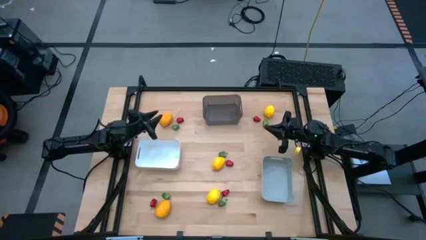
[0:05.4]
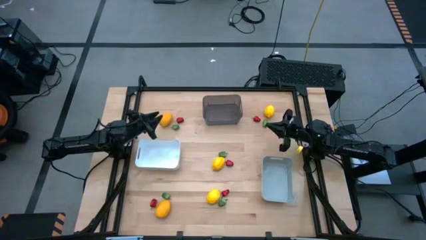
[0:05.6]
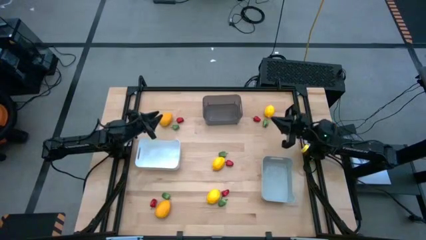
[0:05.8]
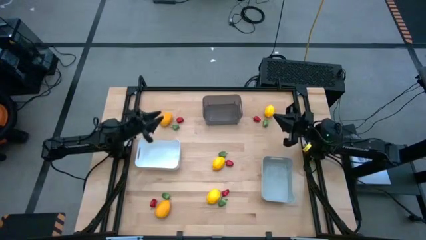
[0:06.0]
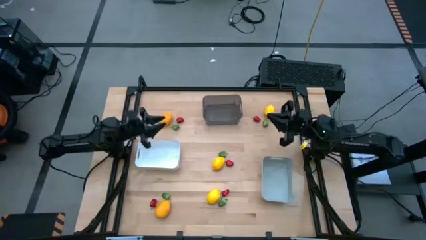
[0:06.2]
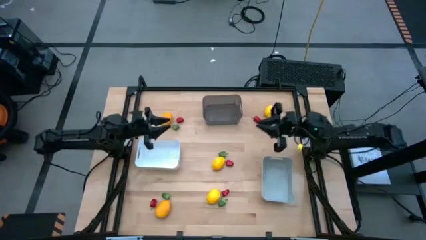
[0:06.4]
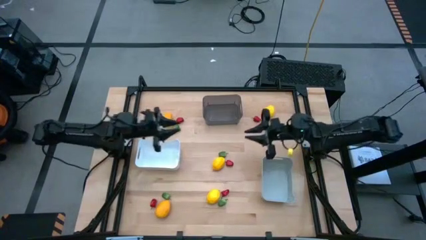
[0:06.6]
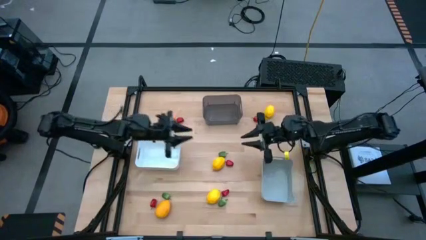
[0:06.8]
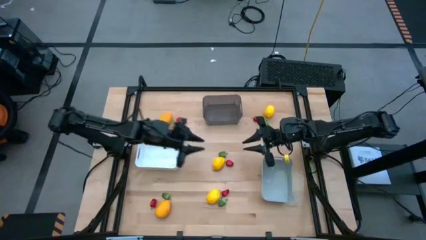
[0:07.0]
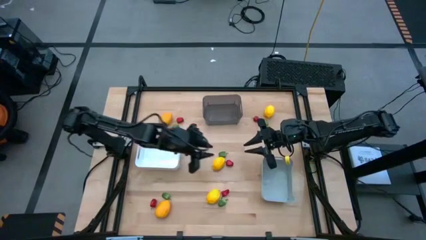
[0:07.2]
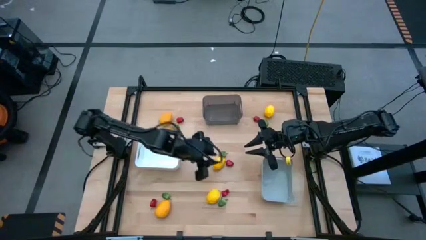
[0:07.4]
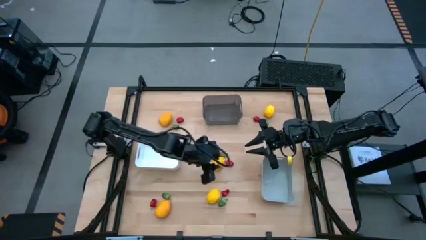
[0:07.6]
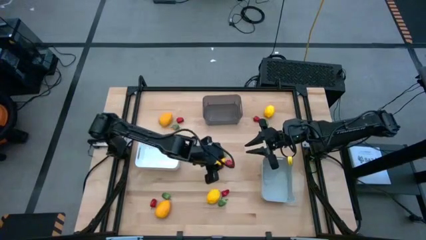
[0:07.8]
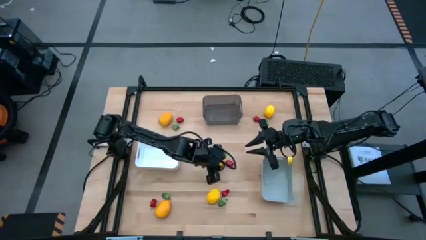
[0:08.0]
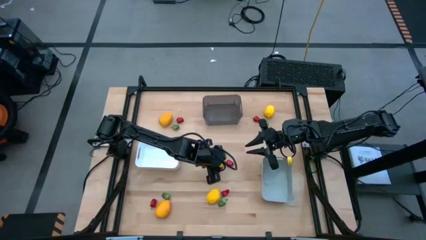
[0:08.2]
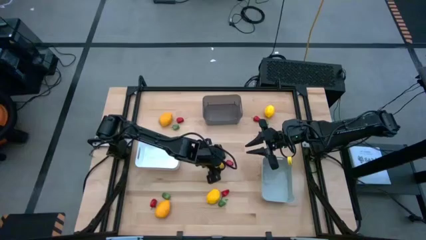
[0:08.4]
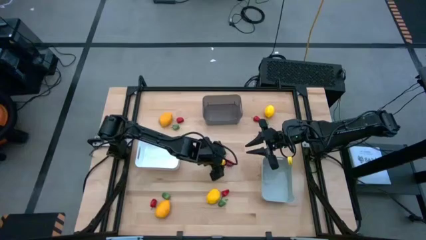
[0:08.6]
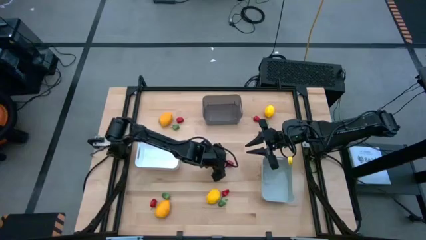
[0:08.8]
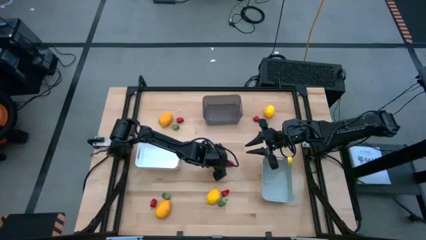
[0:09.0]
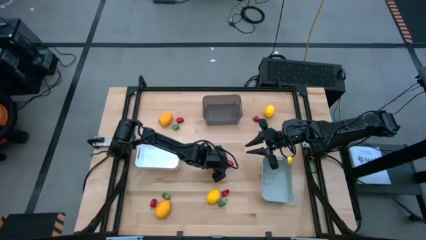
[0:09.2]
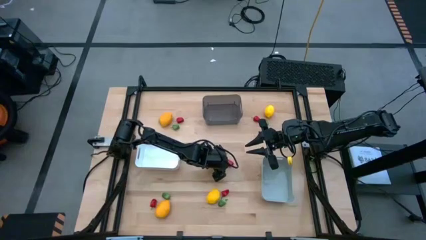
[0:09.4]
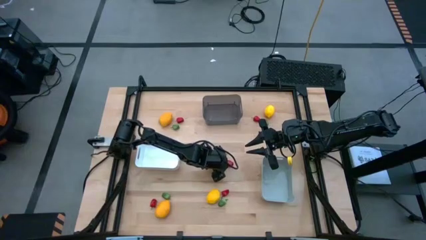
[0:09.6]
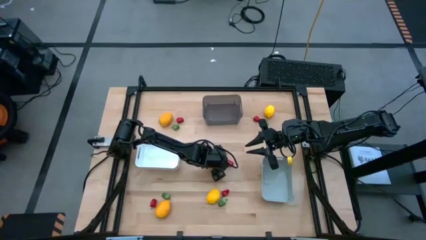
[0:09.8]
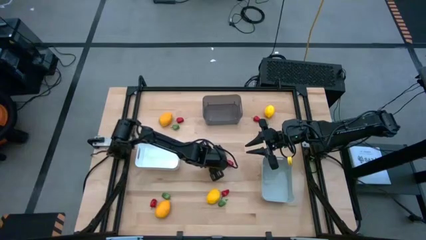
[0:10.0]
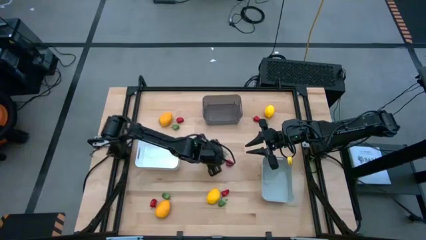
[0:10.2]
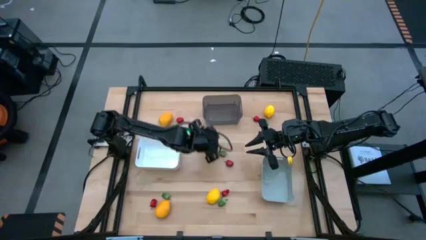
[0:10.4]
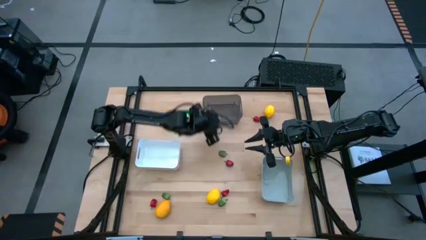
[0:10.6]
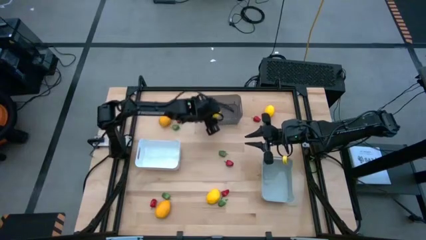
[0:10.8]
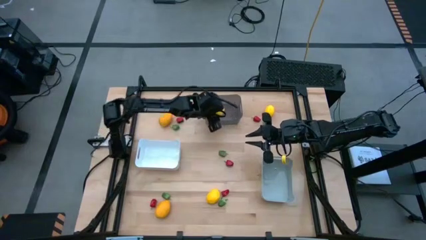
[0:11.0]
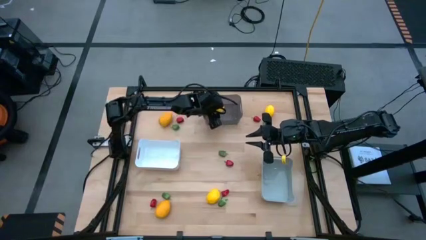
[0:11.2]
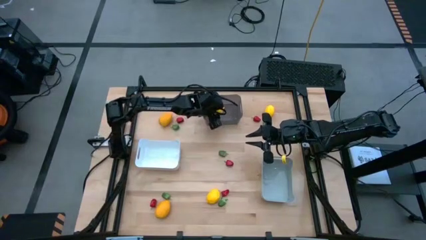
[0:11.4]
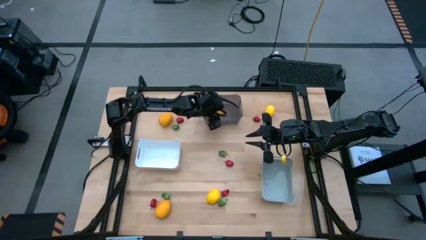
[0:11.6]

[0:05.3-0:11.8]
Task: Sort produce into baskets
Put the yellow lemon into the black bin

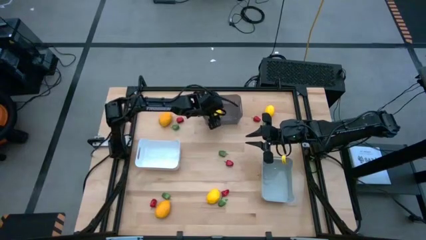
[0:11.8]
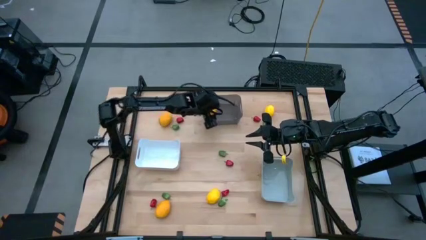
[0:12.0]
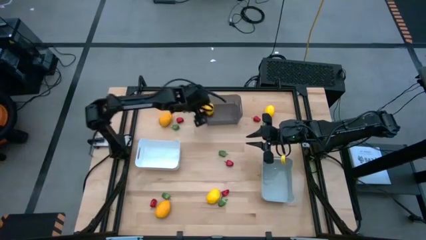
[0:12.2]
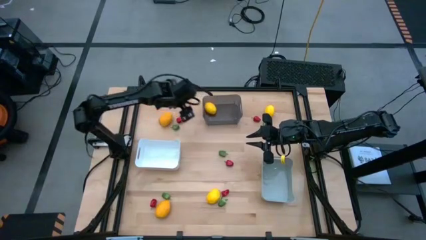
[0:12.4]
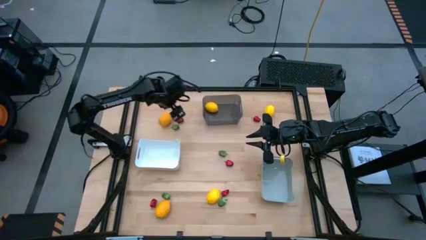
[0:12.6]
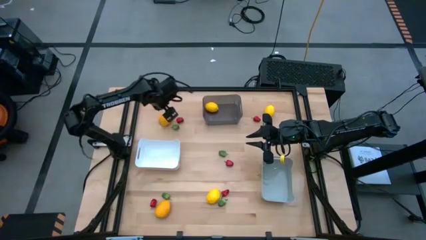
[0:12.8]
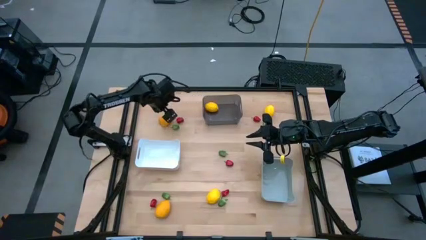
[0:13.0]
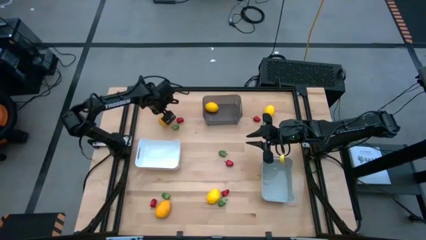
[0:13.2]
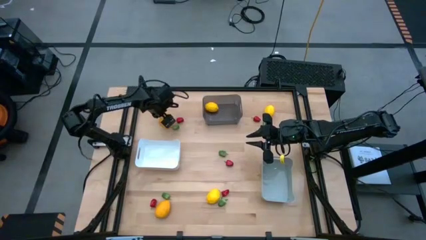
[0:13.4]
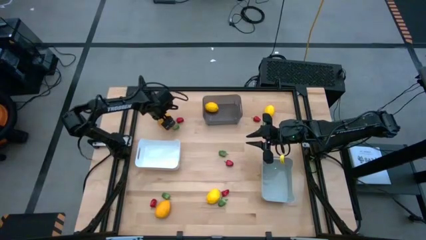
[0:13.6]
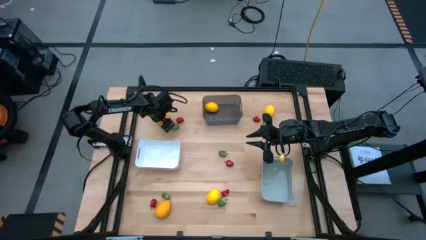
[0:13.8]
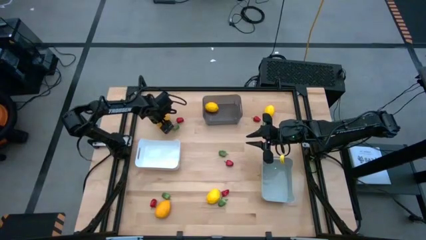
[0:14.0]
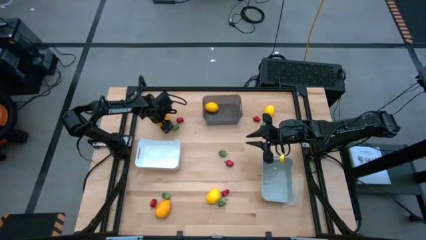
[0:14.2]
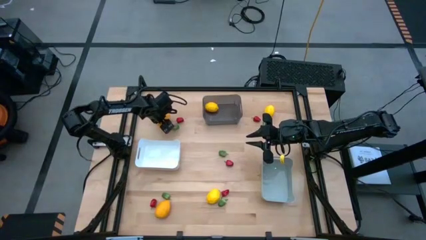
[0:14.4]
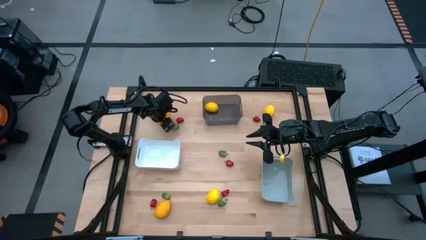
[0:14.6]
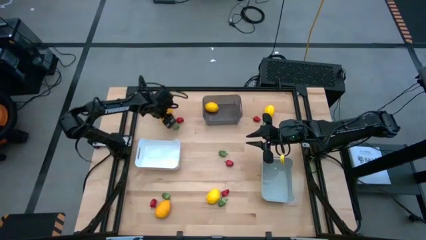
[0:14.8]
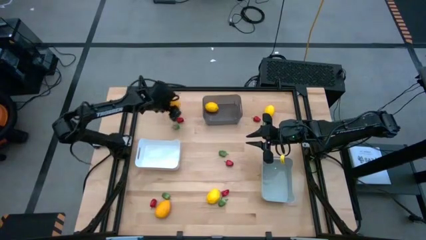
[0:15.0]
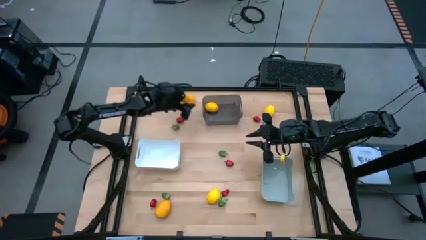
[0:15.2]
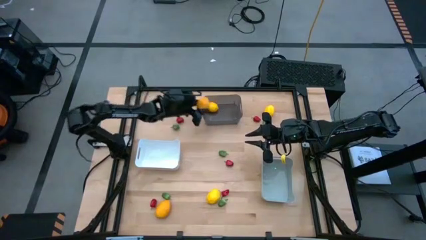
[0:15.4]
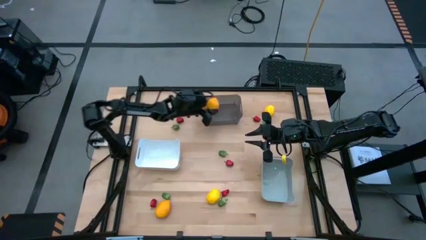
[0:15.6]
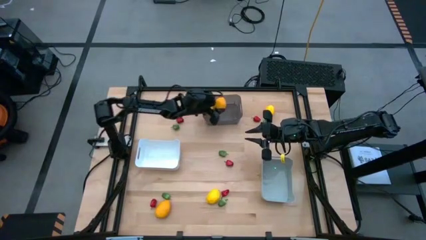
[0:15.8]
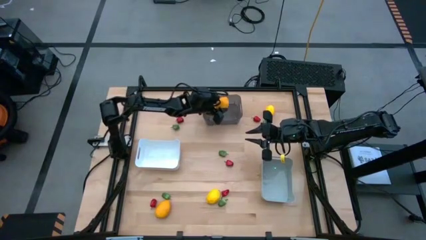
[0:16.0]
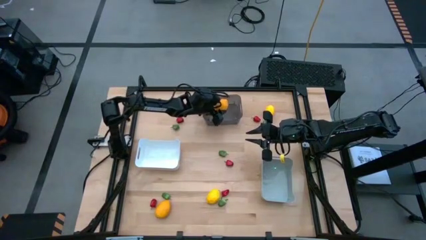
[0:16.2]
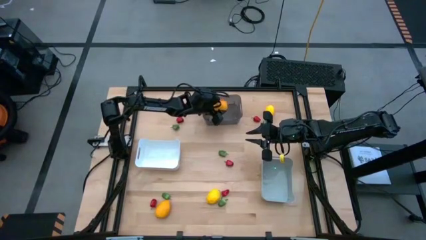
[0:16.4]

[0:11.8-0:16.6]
Put the yellow lemon into the black bin

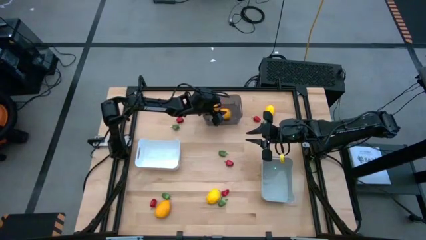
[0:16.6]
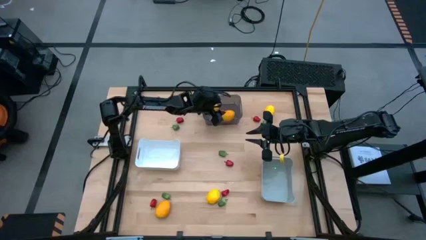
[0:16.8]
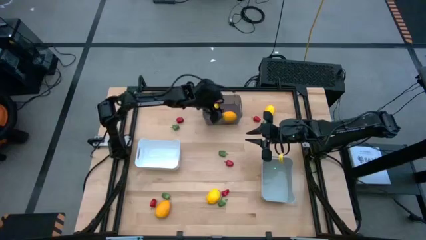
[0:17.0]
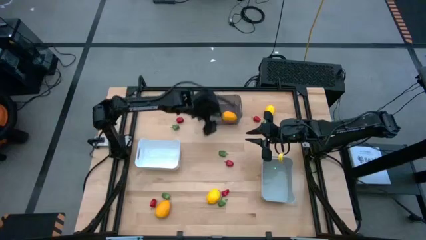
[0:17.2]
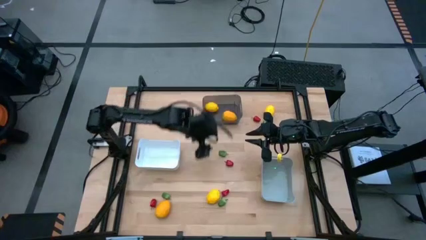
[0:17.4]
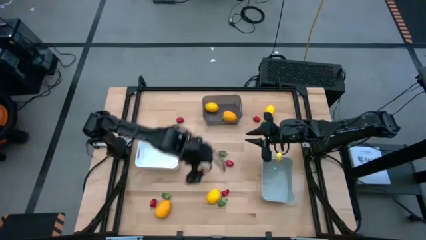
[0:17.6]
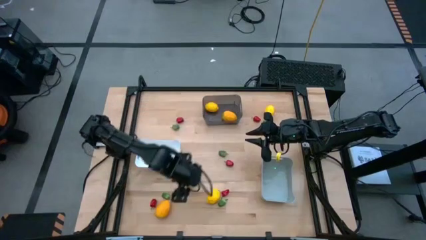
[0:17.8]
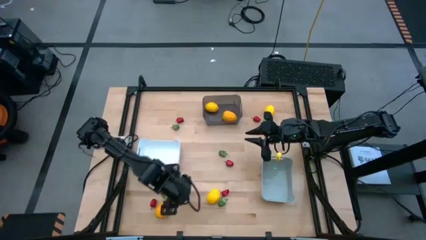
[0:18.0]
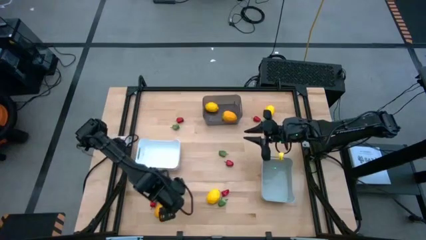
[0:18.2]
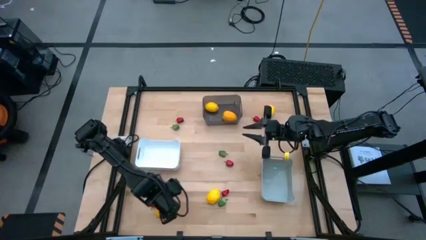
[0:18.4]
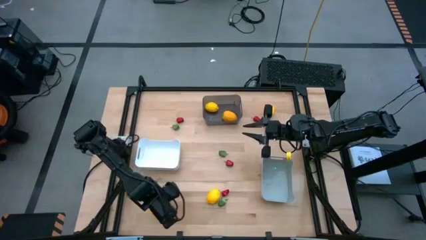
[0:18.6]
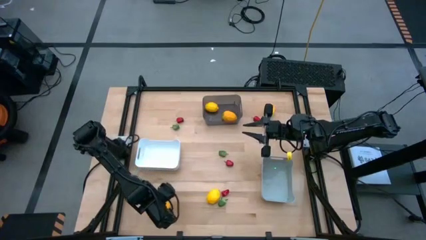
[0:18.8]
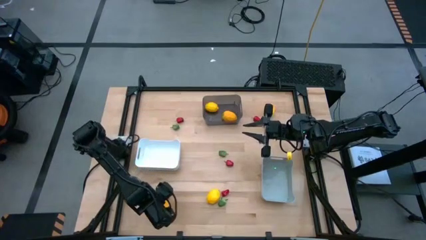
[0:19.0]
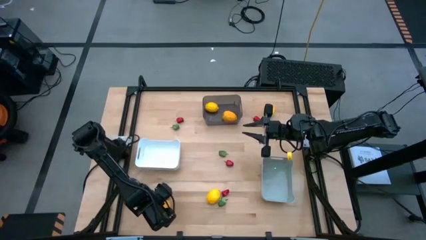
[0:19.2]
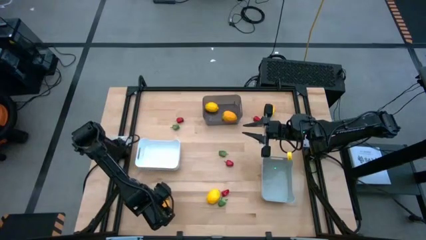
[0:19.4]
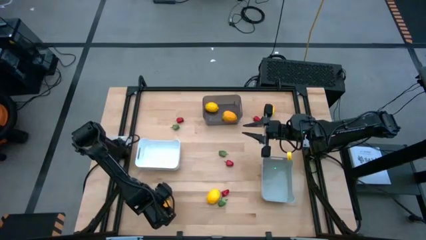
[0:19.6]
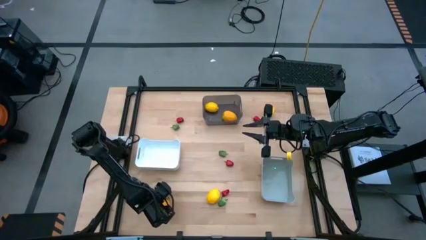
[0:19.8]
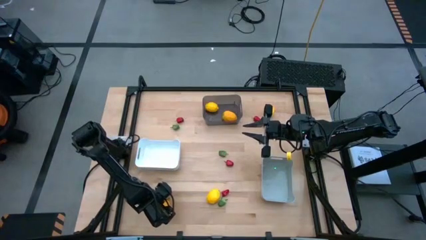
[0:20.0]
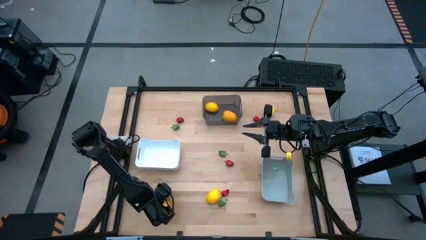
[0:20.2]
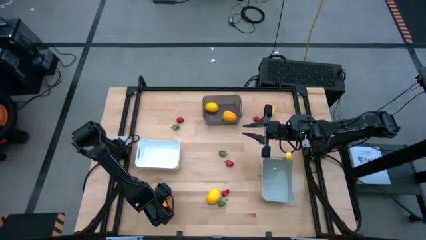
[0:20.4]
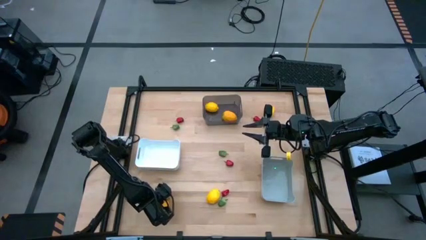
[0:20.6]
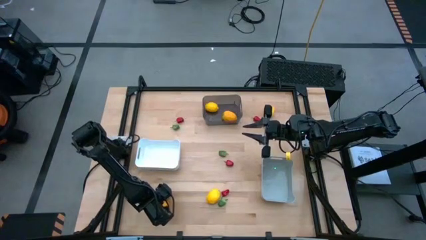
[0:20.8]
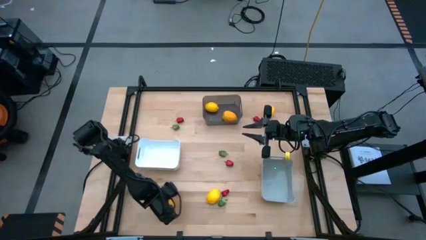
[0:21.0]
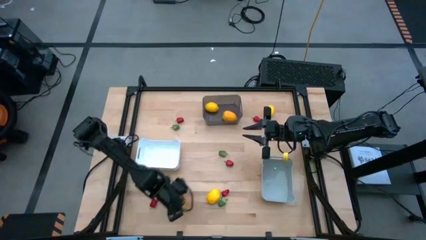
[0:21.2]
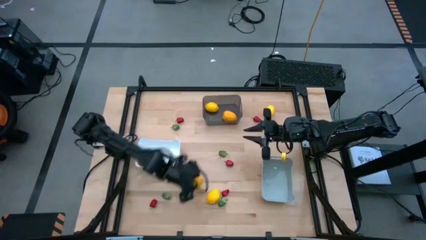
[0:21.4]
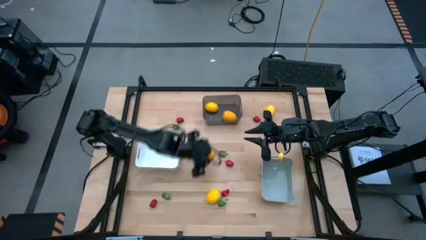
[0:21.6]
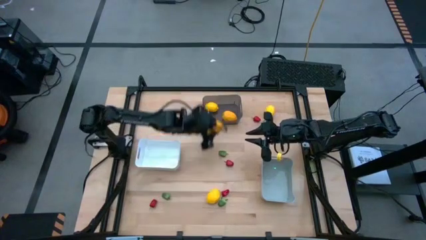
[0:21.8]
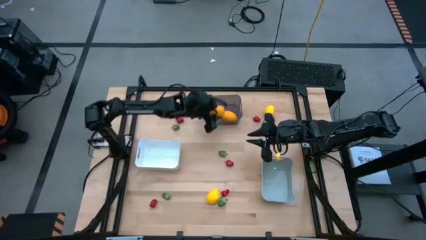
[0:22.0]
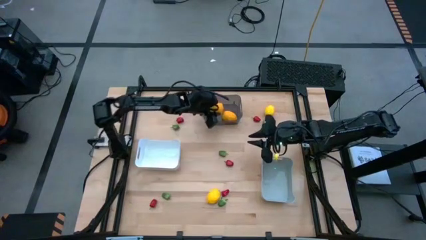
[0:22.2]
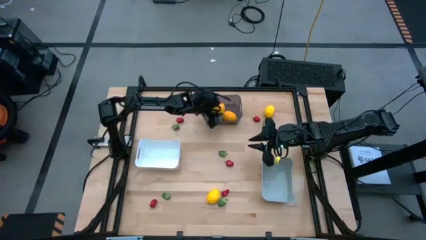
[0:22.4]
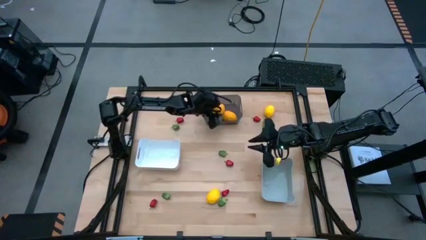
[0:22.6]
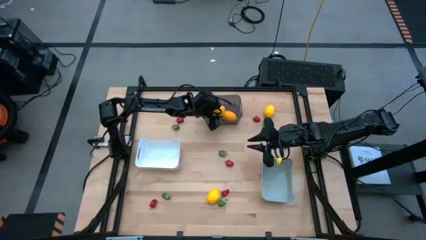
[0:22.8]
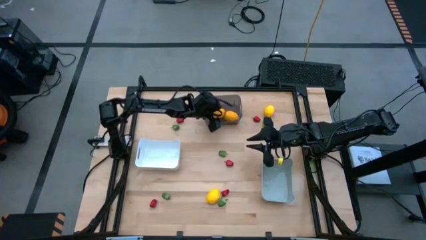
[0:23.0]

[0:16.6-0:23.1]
Put the yellow lemon into the black bin
